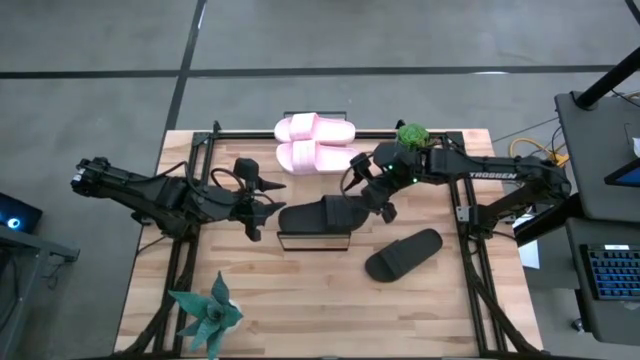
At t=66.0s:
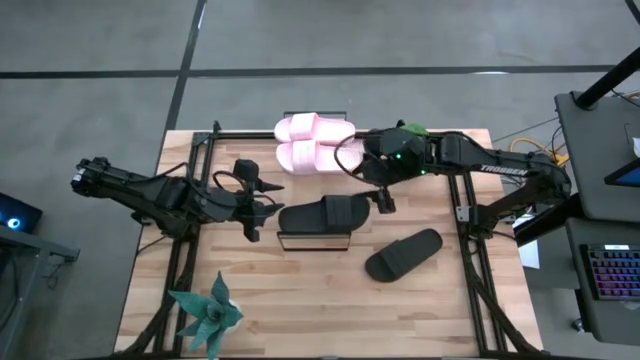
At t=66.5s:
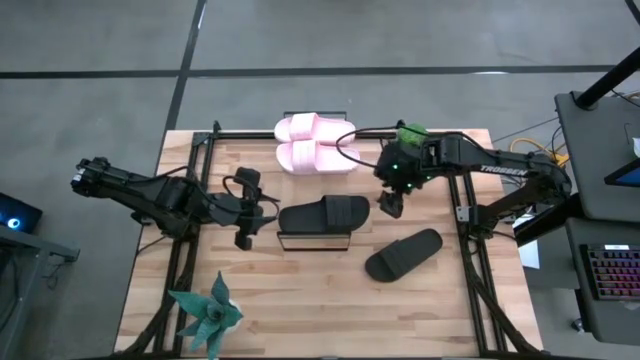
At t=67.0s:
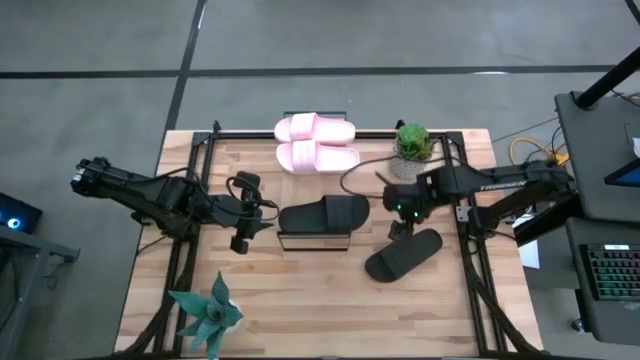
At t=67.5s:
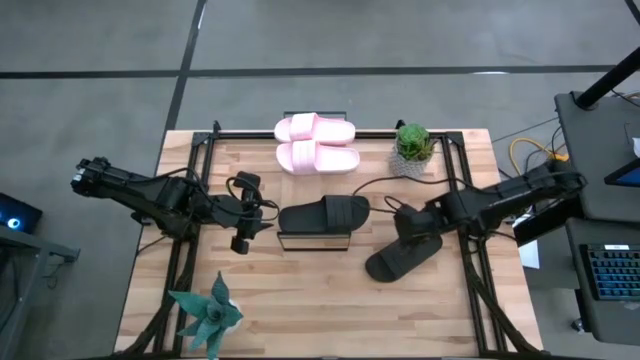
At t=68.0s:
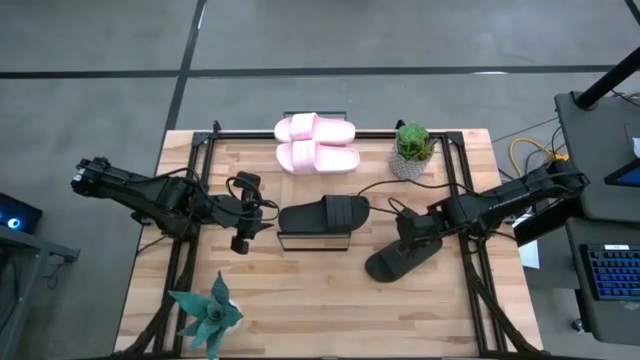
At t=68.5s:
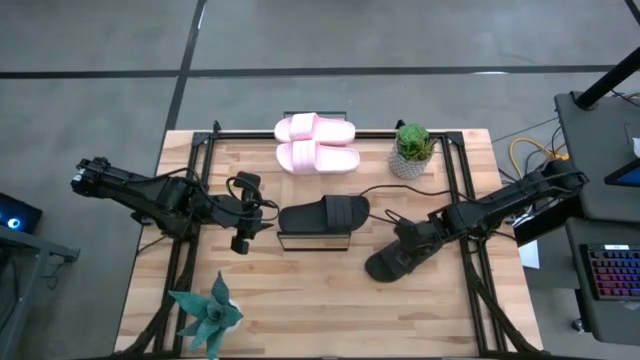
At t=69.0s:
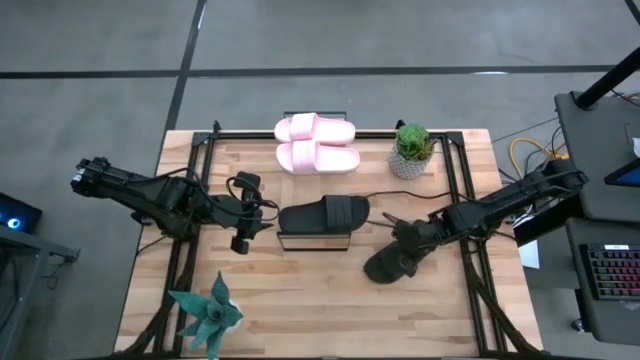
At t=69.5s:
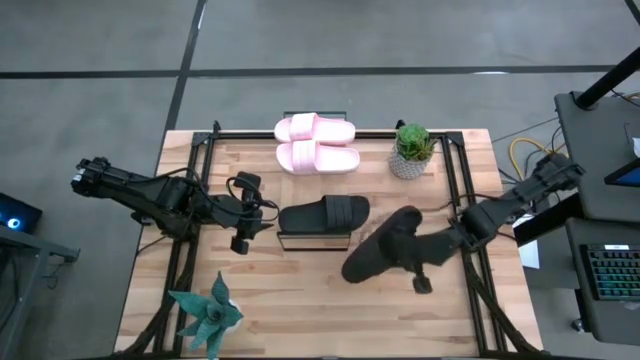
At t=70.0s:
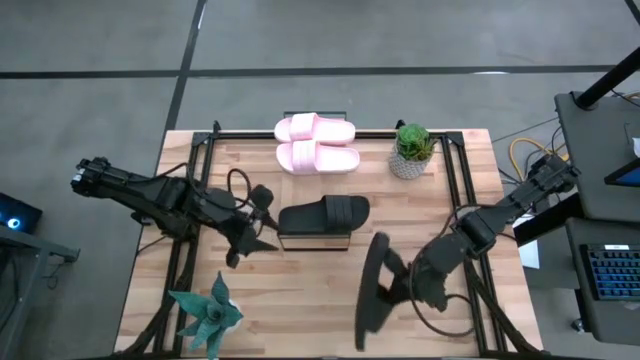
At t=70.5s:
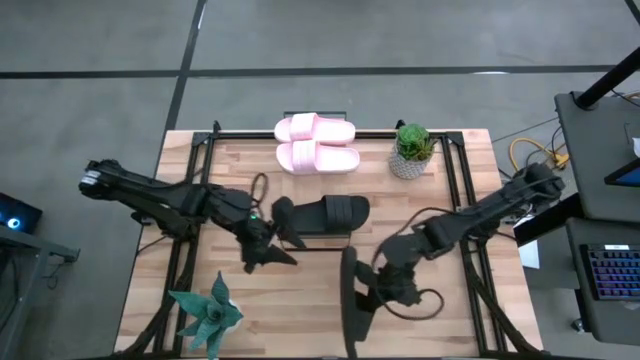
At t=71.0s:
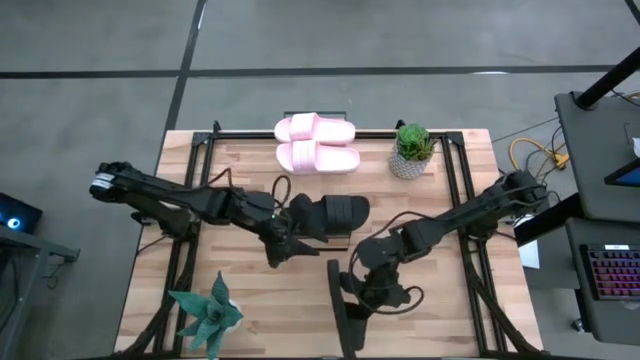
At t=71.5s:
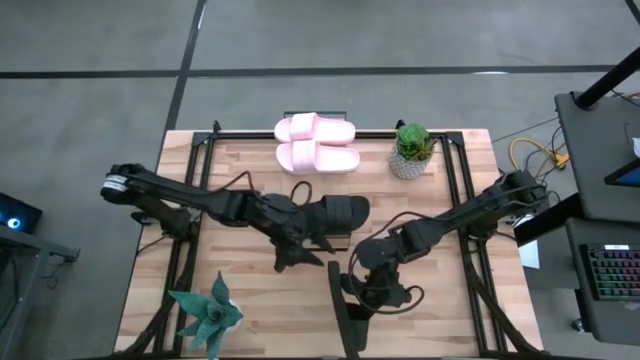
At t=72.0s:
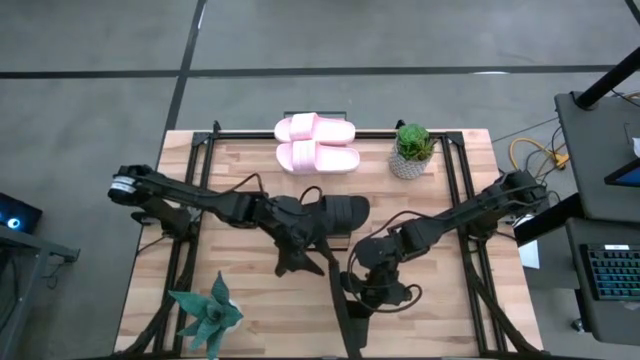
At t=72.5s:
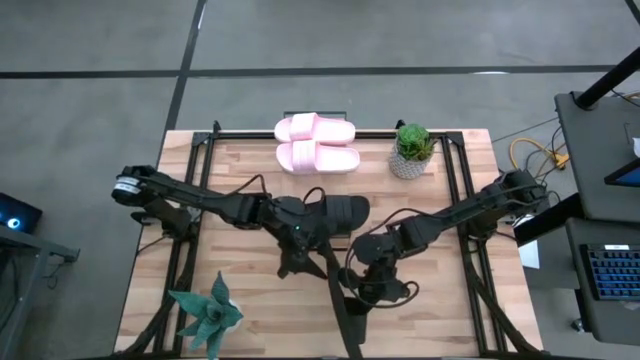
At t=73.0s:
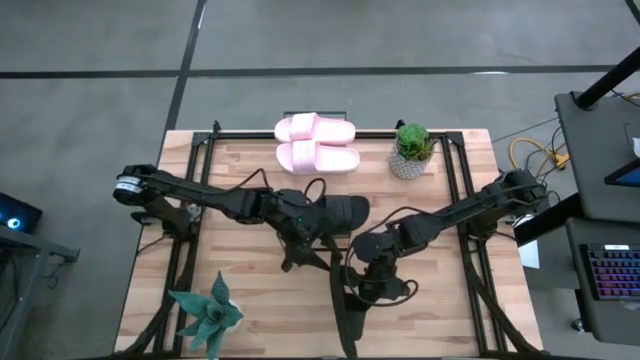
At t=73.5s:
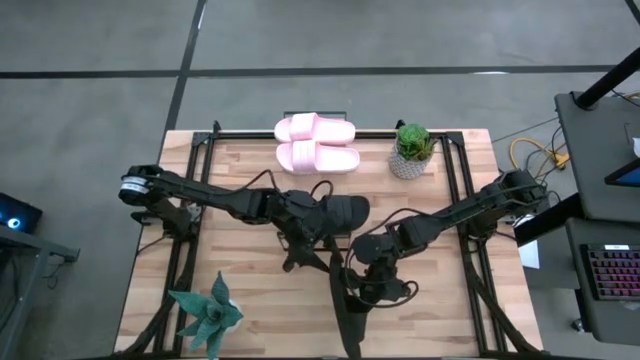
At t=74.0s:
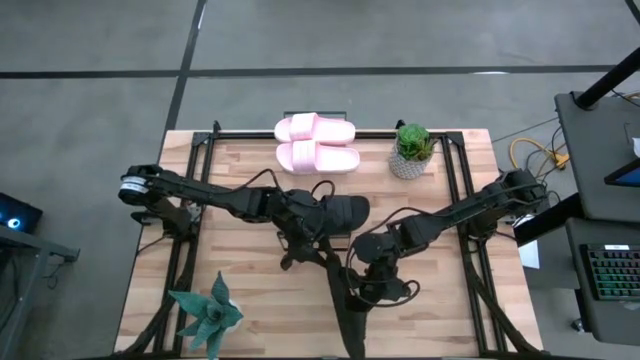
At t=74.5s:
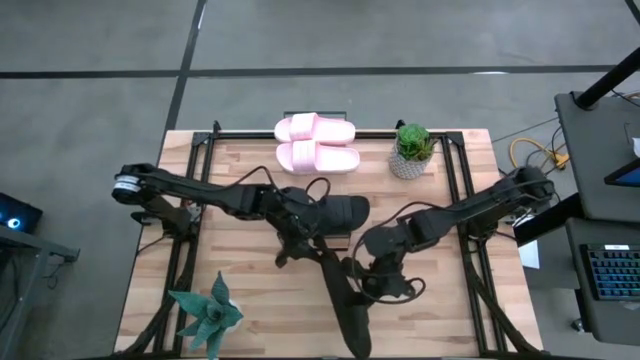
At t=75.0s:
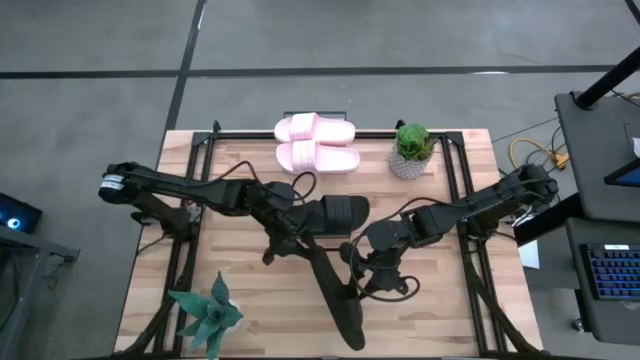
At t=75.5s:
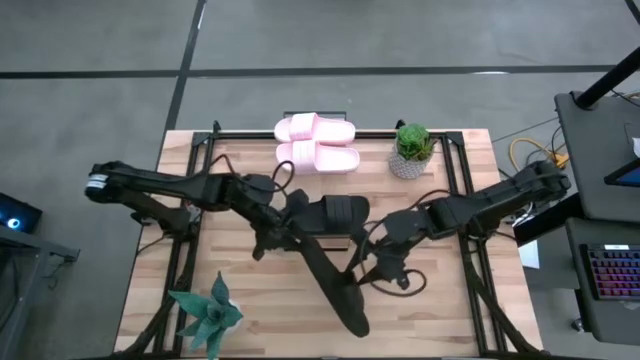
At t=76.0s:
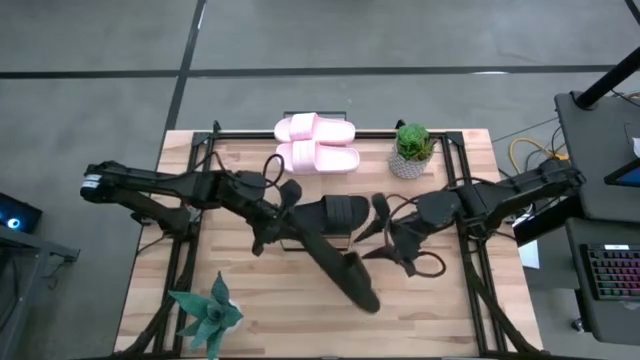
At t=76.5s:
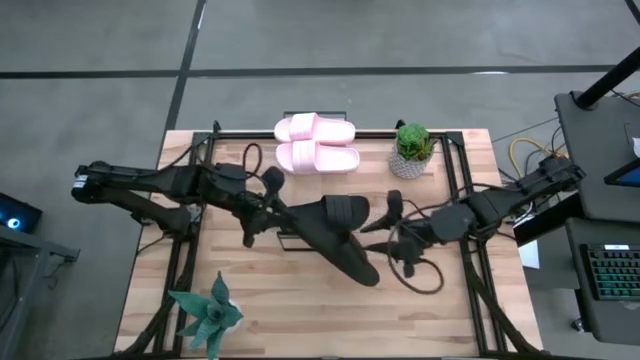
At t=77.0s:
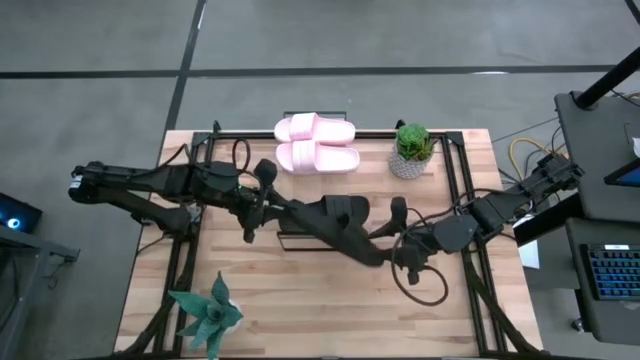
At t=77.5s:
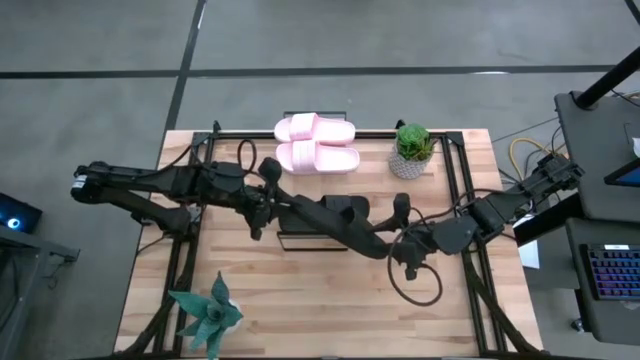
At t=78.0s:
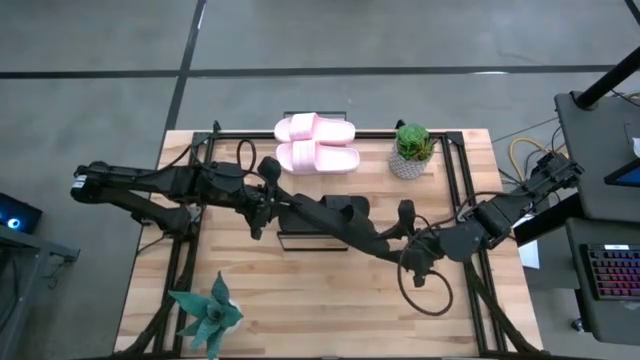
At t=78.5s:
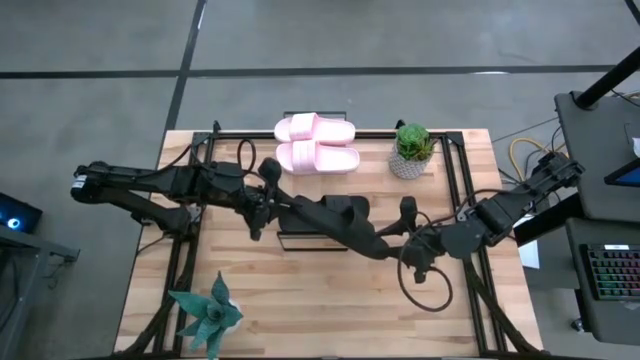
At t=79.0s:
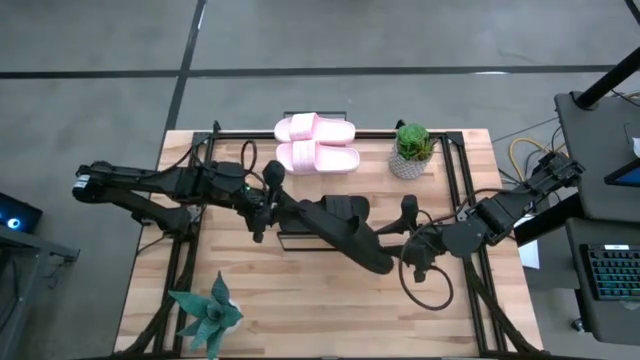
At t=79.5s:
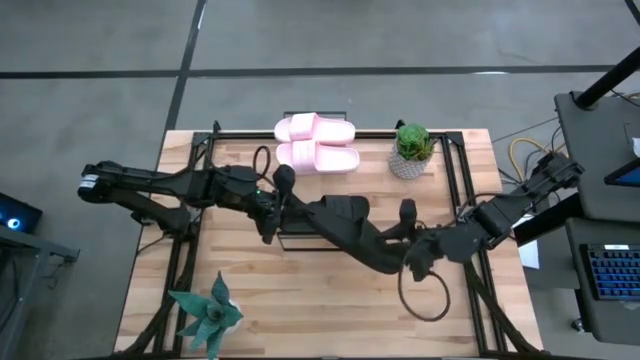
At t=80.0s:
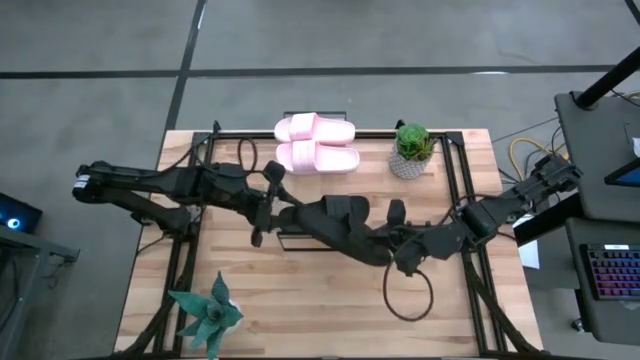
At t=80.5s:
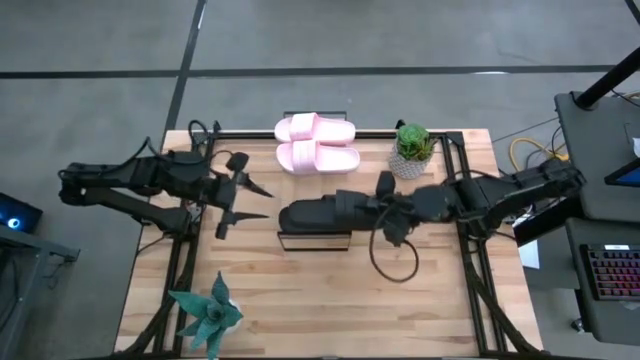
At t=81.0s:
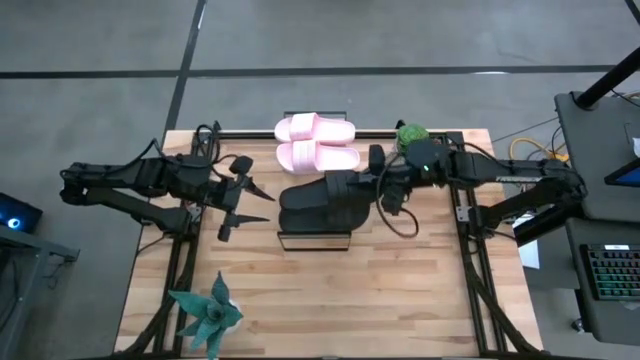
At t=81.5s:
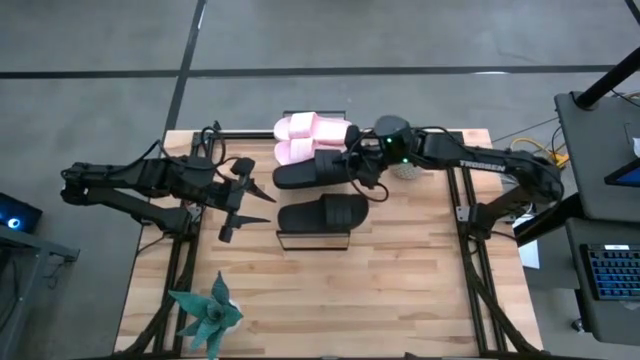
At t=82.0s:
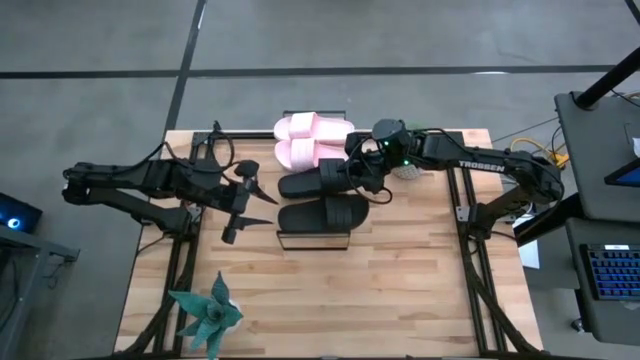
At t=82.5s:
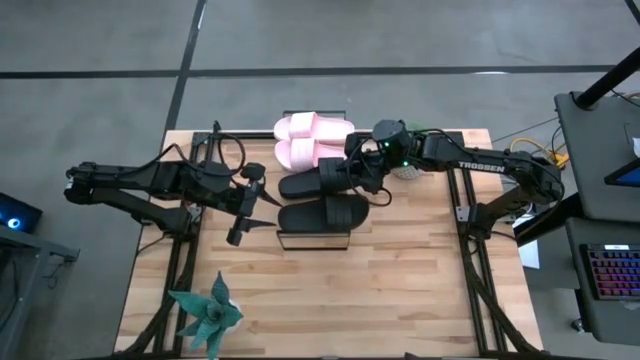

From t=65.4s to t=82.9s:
Task: Pick and place slides into the shelf
Put the black slide on the shelf

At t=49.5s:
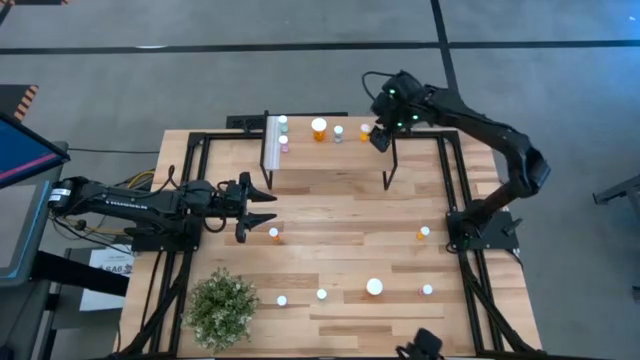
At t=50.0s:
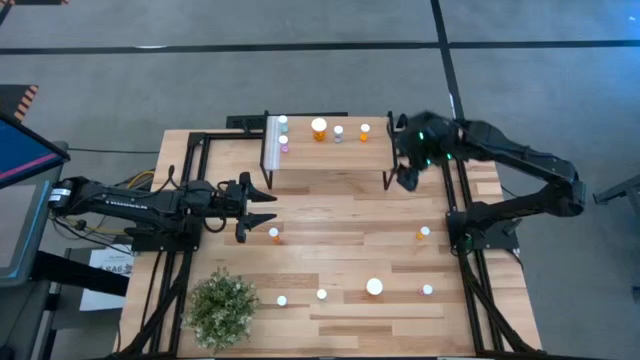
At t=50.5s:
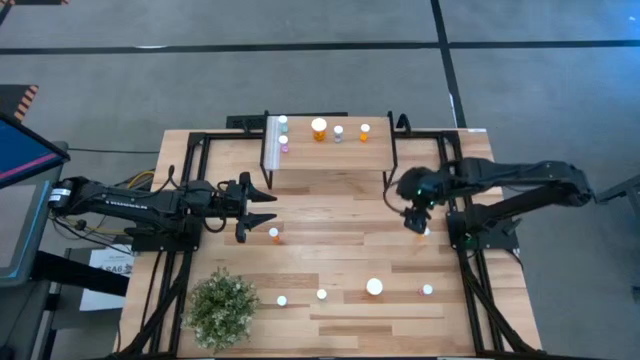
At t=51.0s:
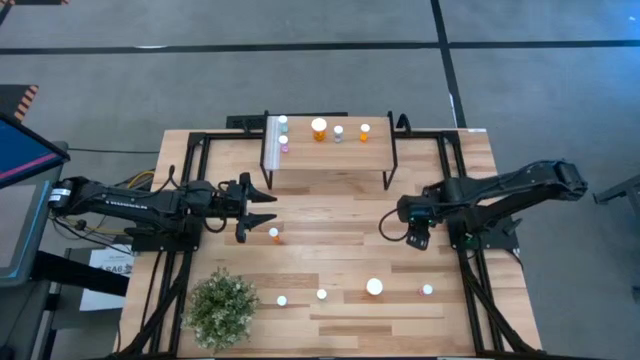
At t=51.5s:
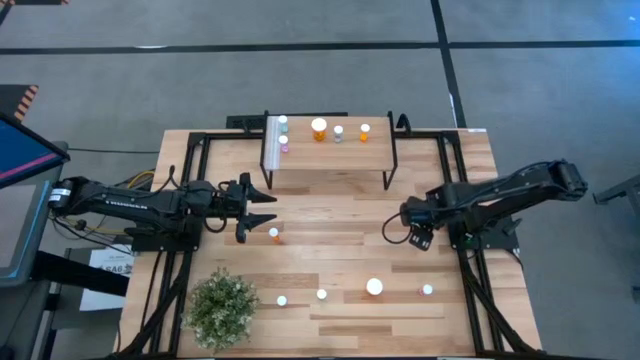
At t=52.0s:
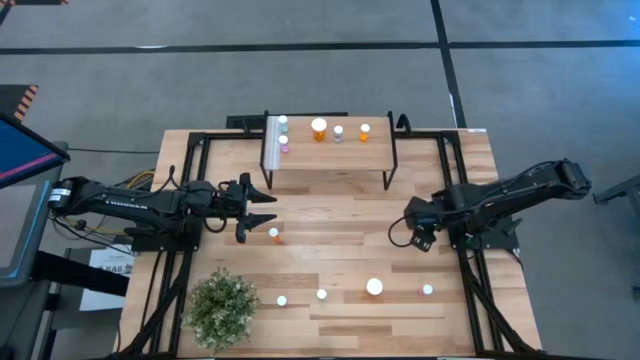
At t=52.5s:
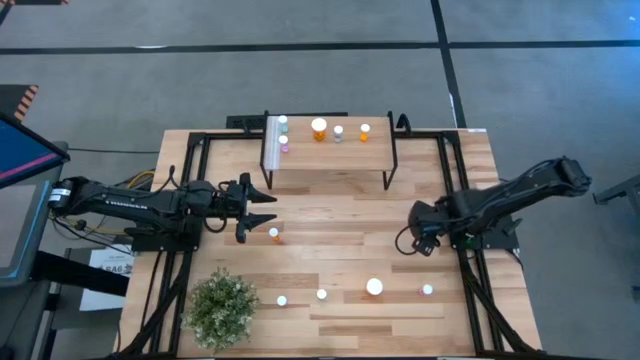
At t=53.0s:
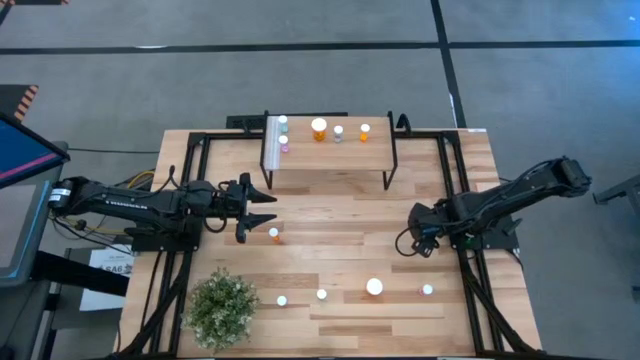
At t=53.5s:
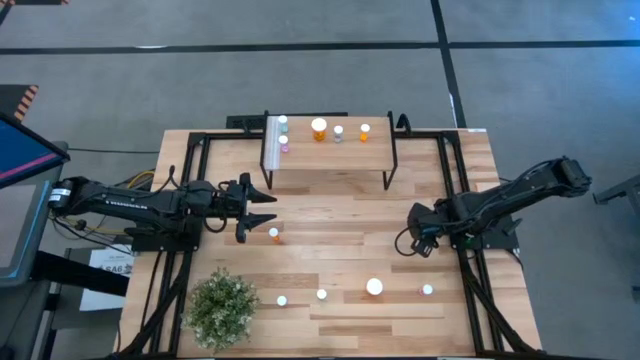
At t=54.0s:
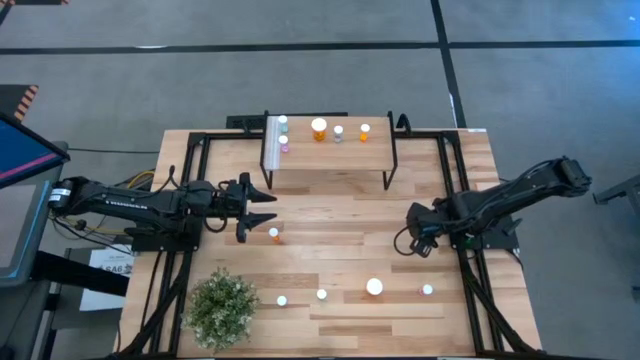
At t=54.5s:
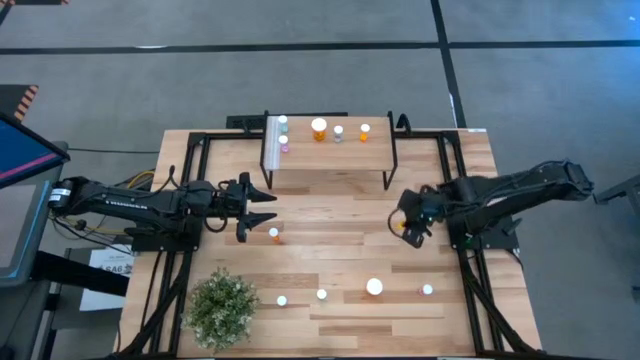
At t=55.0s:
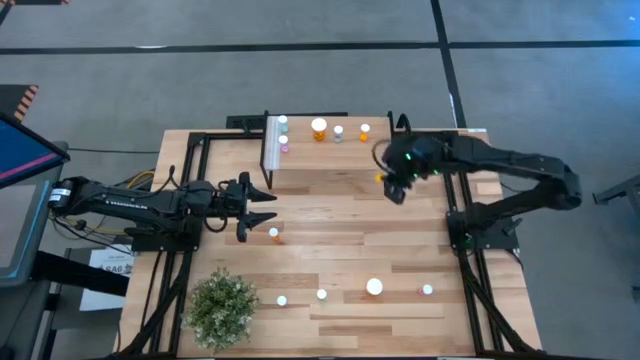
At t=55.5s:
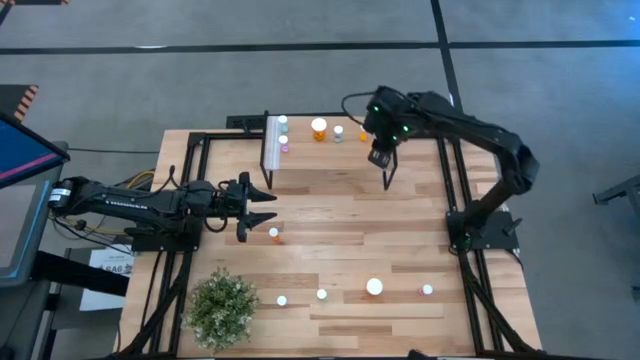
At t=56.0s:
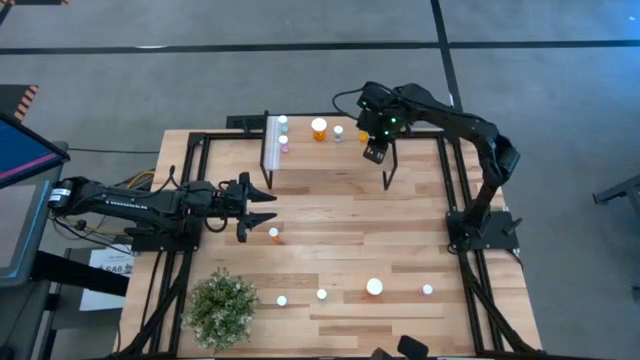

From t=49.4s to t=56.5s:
Task: Pick and place medicine bottles onto shelf by color
Put the right small orange pill bottle on the shelf
